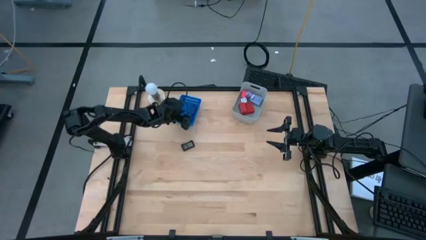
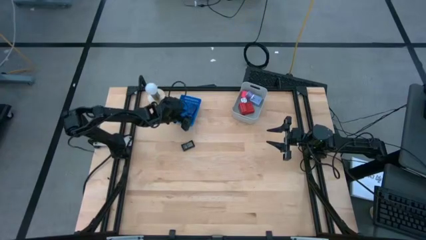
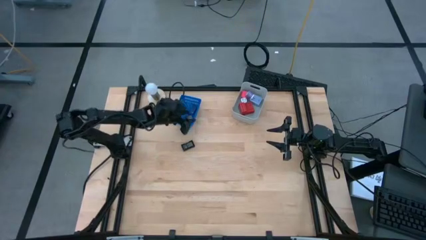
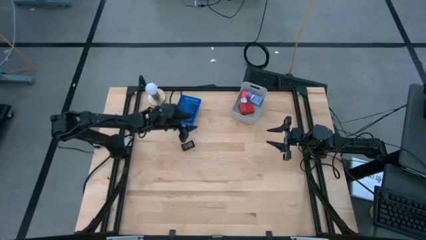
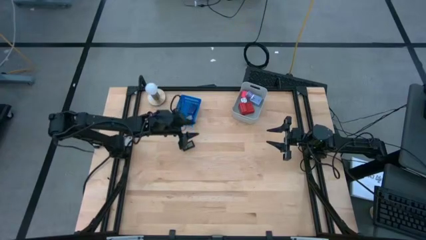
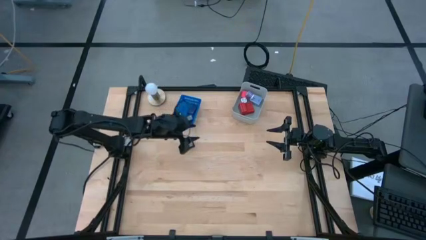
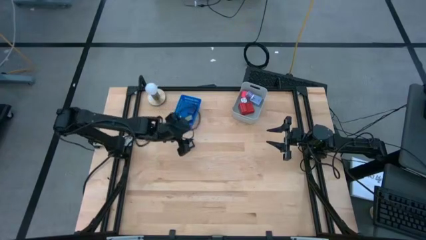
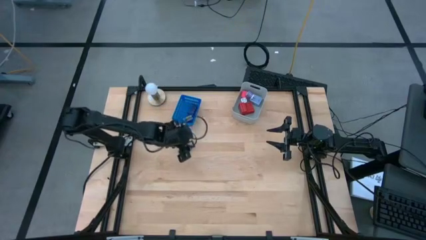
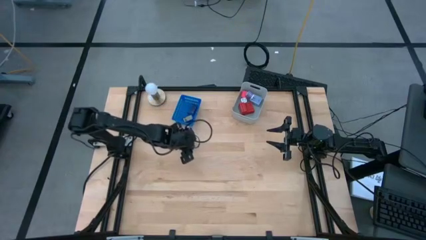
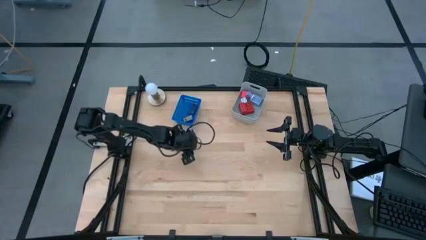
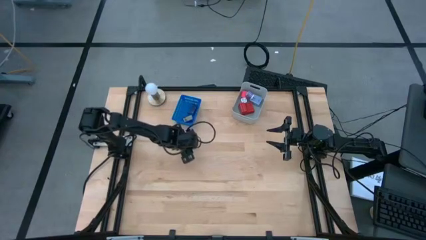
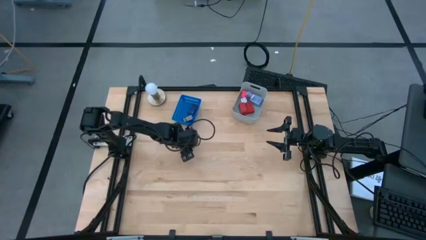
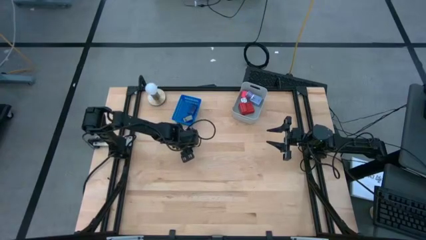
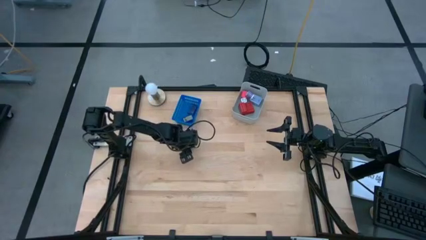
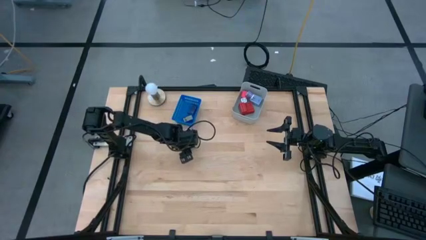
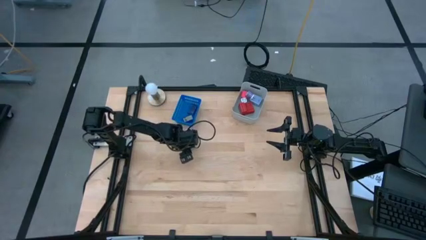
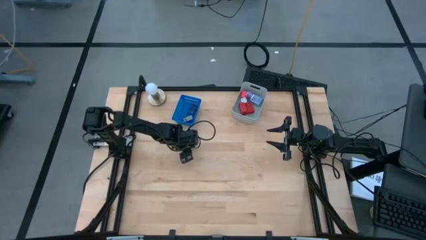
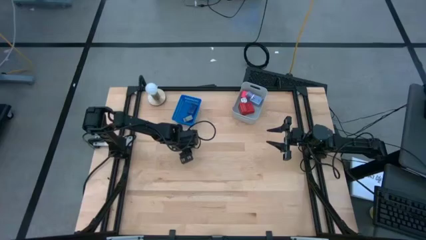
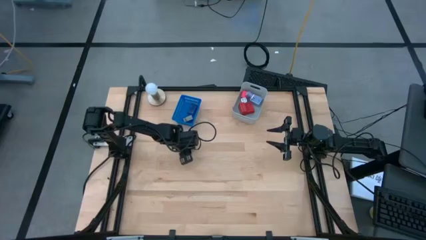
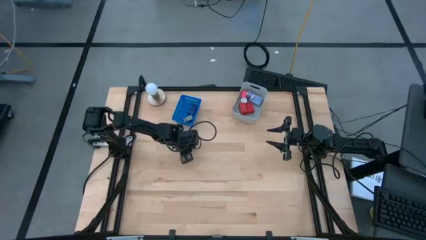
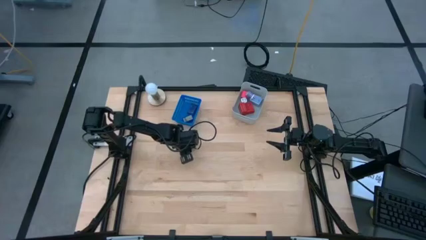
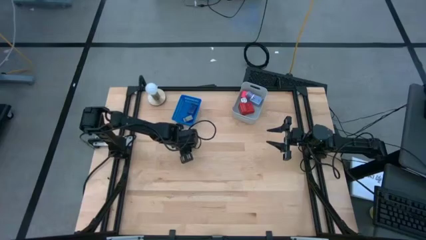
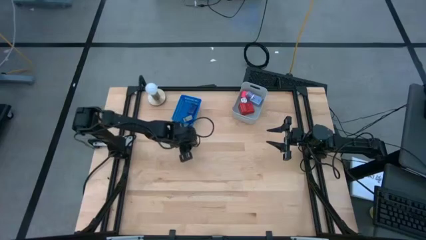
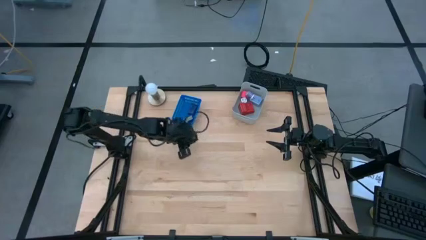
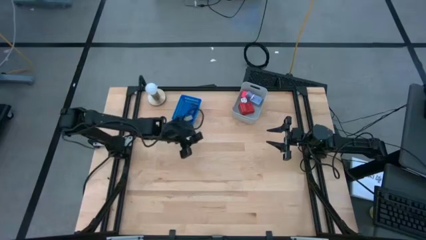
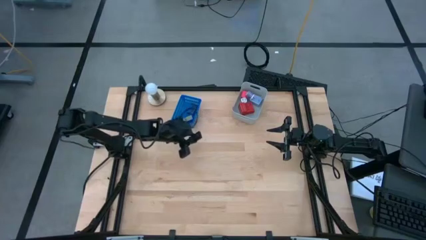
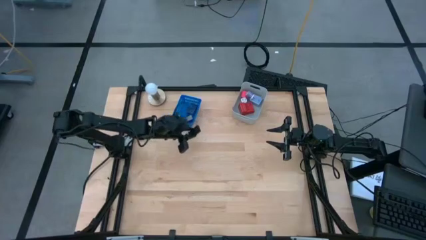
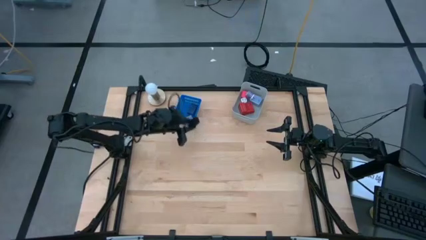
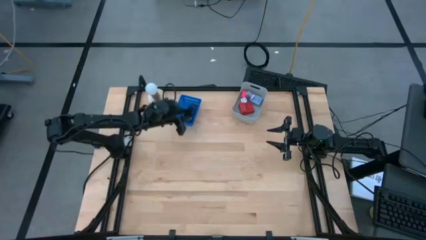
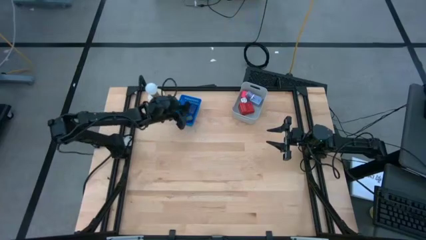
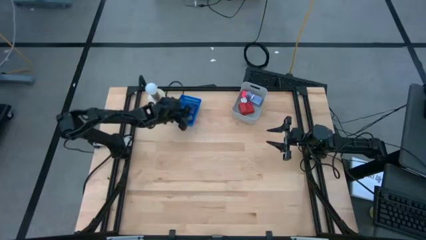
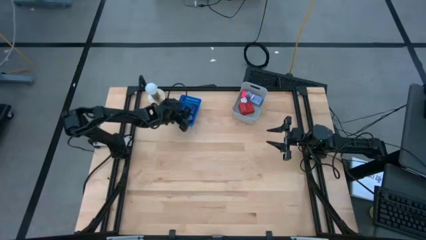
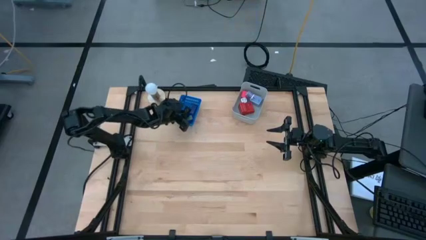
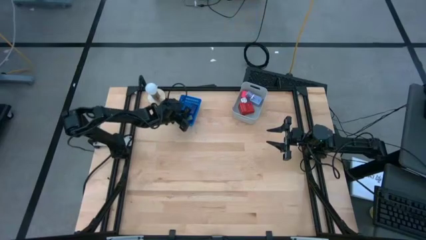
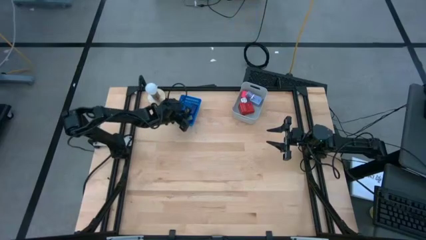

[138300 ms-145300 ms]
Task: Pick & Place Office items
Put the black digital clock into the blue bin

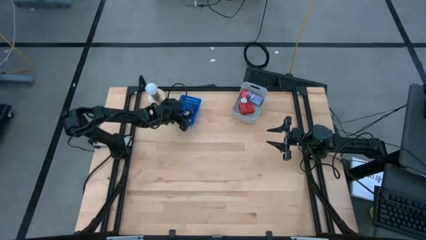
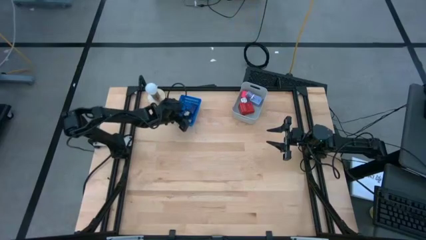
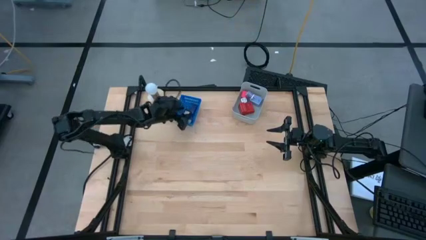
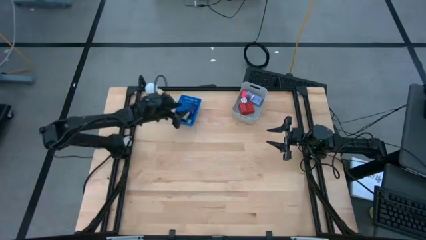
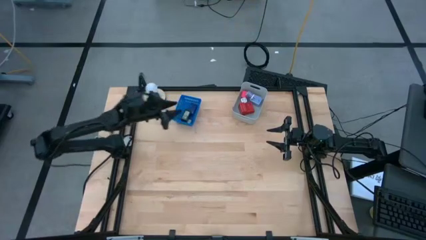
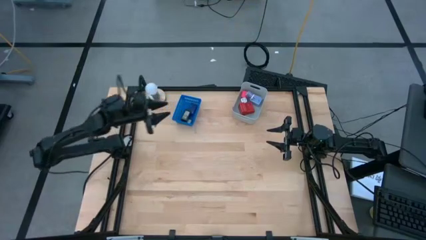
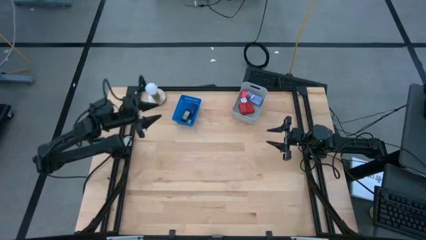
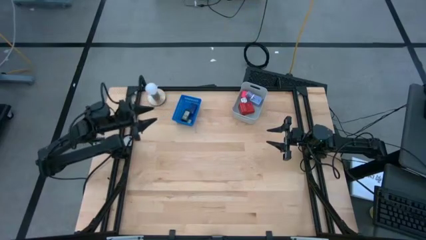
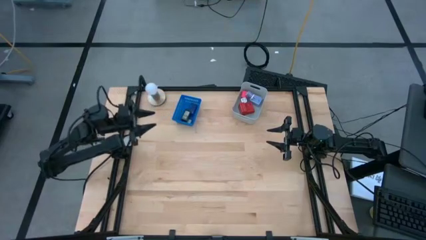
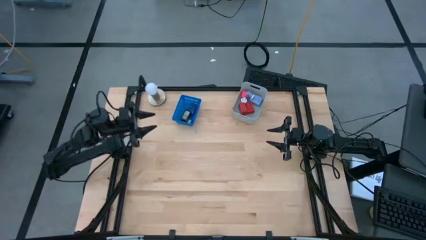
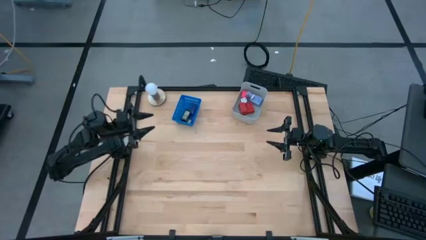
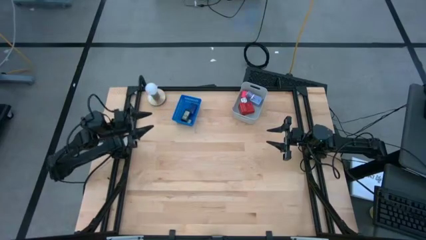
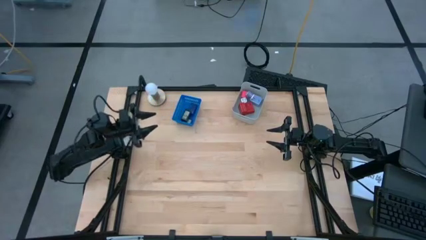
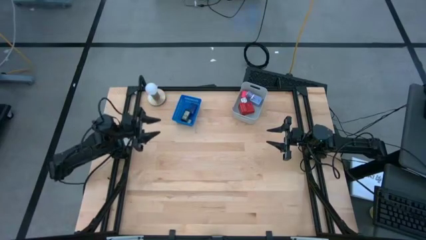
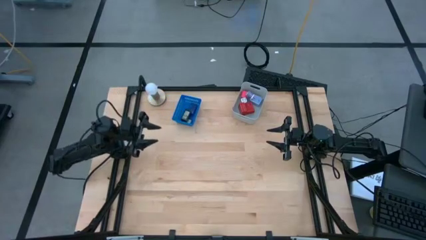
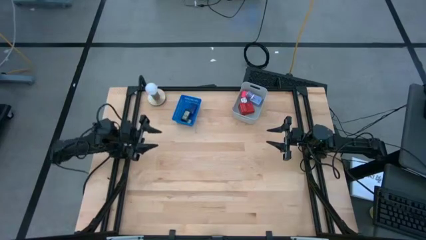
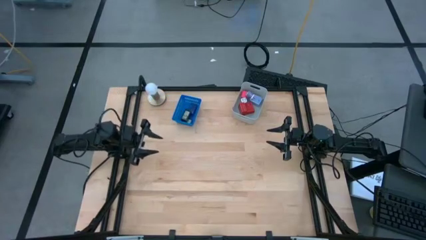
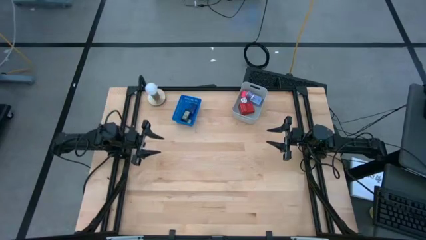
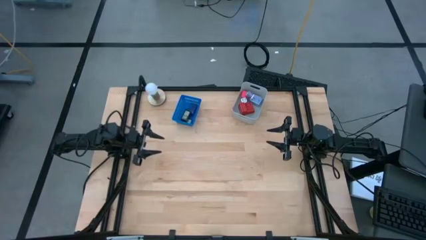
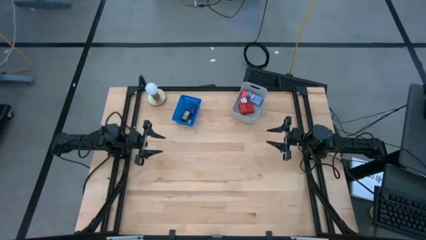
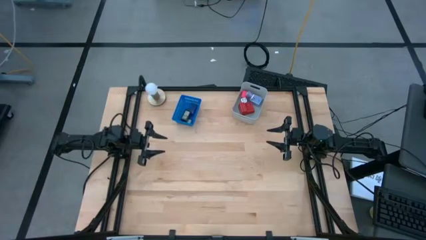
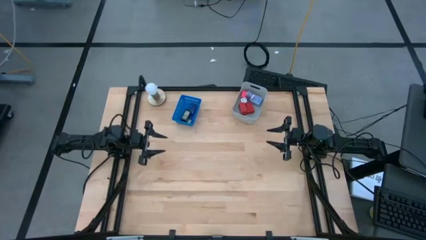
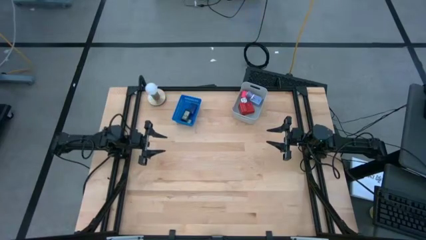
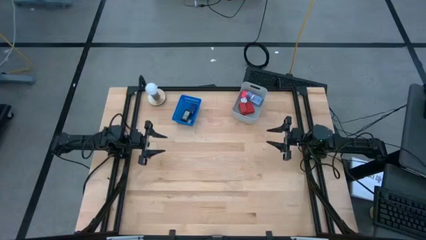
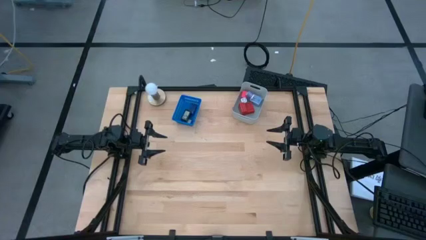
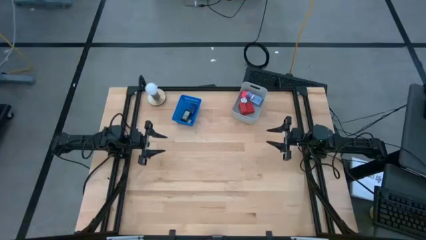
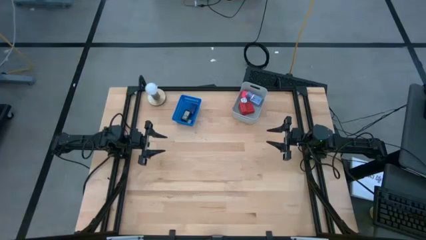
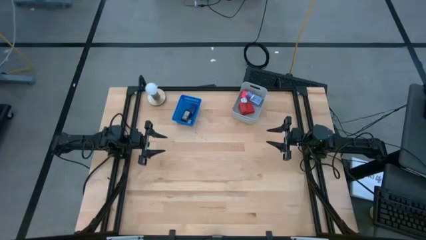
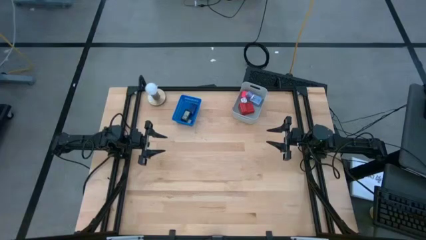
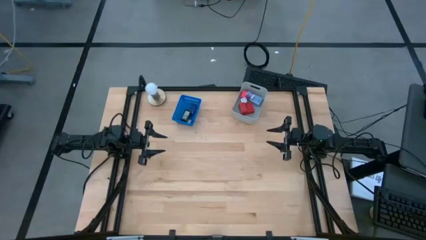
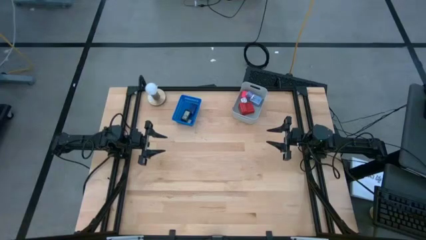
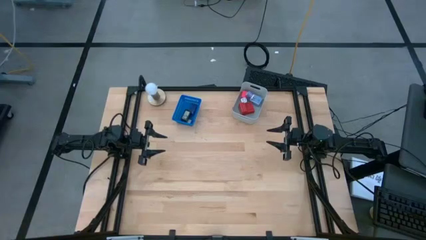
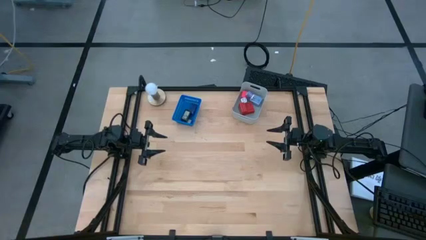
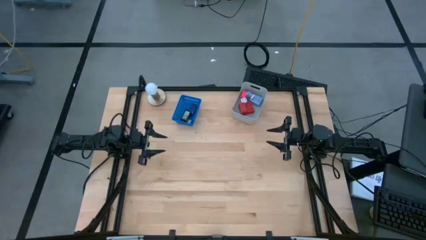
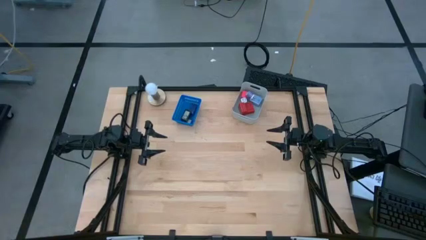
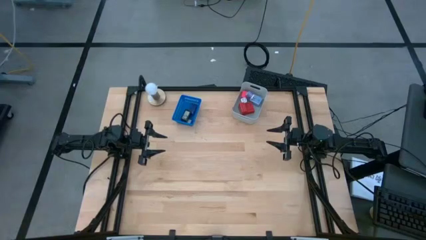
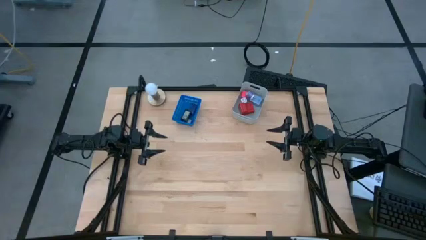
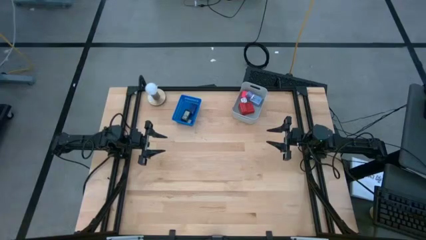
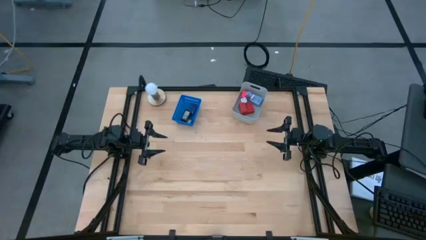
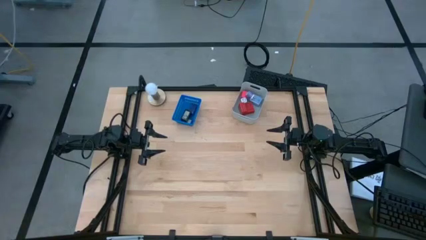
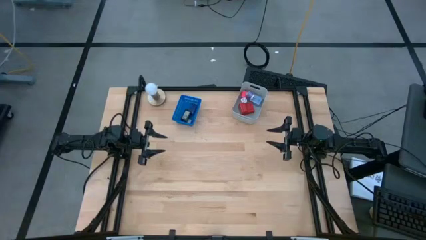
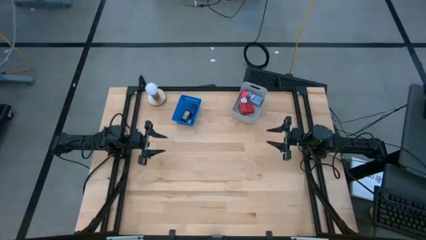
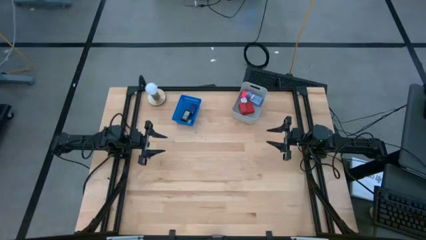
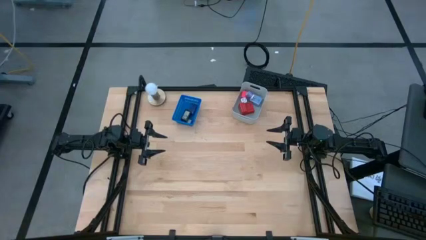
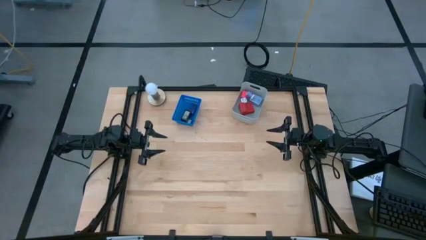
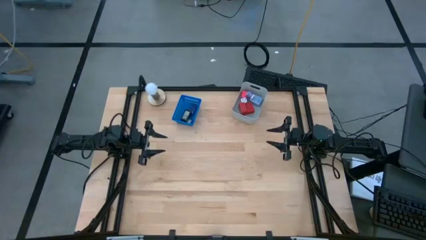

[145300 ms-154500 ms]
Return to Home Position
